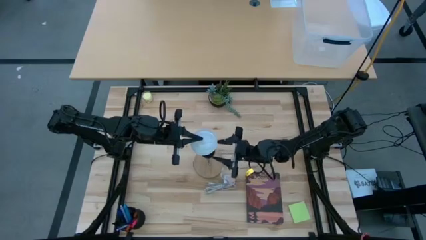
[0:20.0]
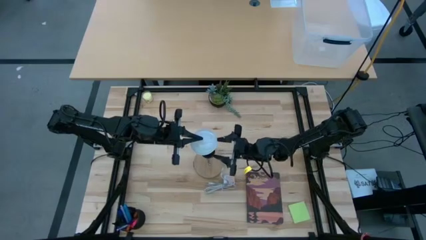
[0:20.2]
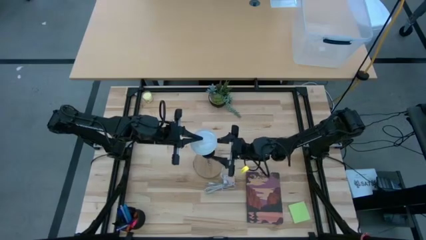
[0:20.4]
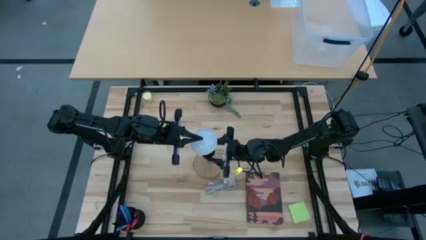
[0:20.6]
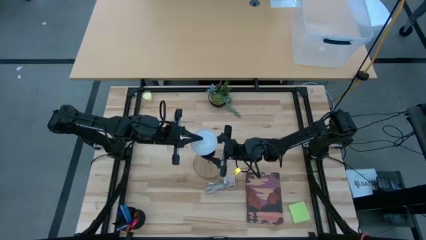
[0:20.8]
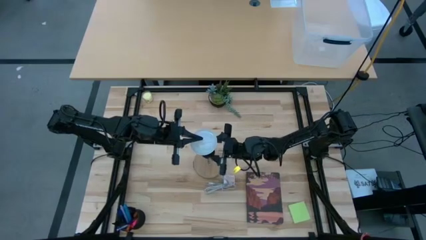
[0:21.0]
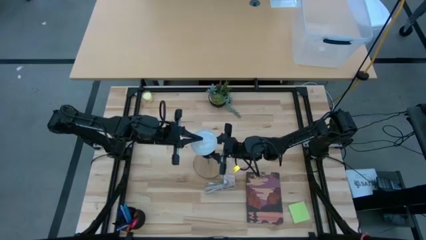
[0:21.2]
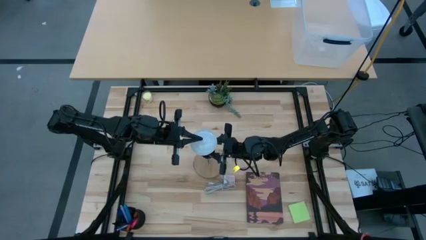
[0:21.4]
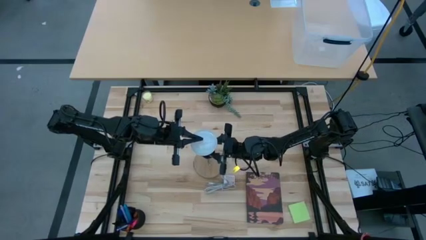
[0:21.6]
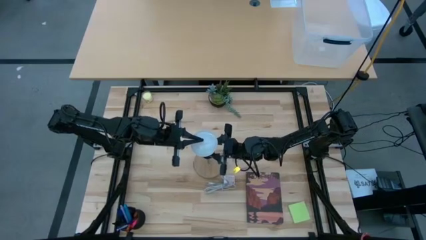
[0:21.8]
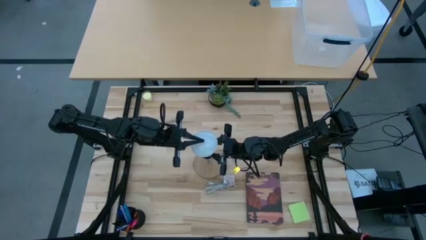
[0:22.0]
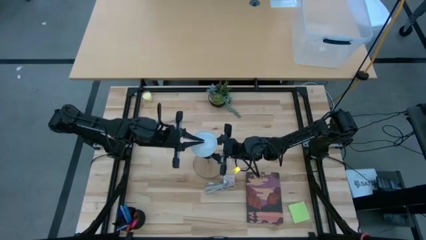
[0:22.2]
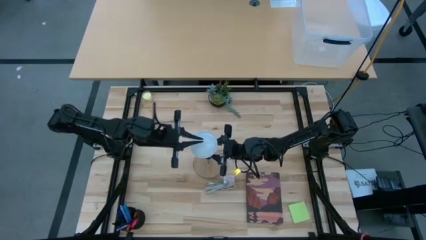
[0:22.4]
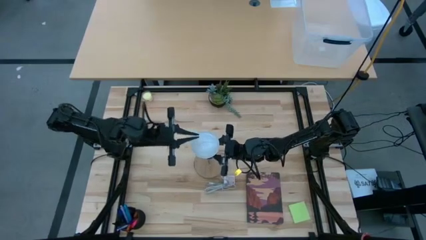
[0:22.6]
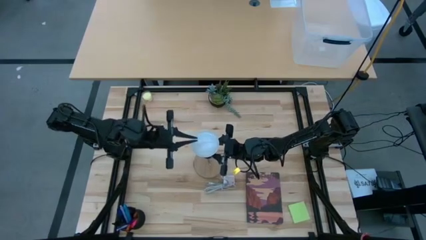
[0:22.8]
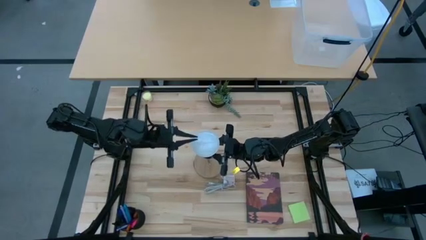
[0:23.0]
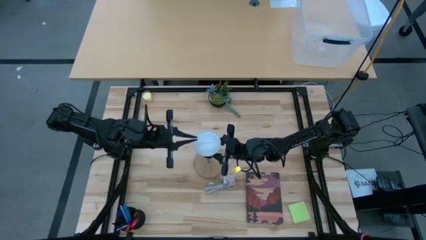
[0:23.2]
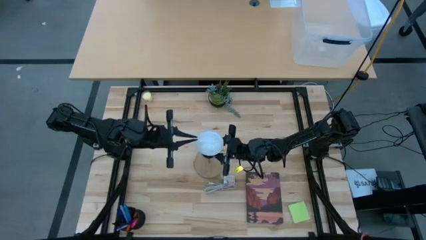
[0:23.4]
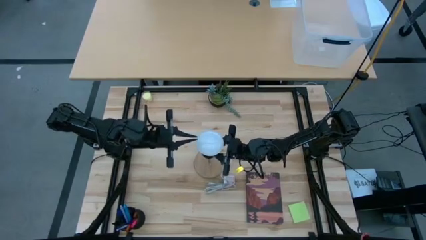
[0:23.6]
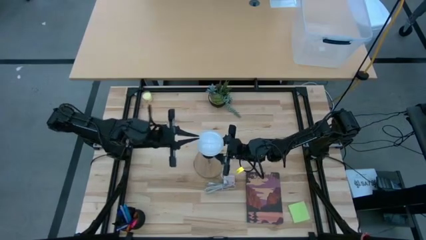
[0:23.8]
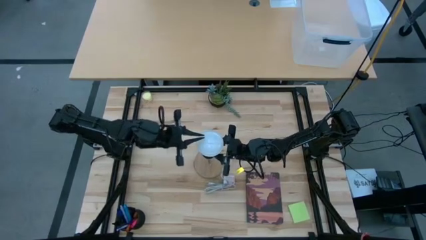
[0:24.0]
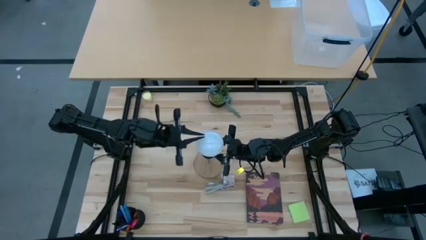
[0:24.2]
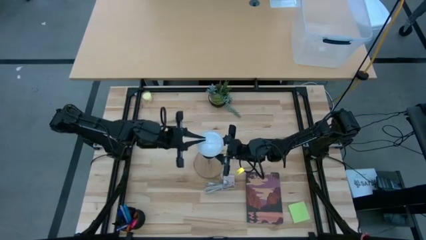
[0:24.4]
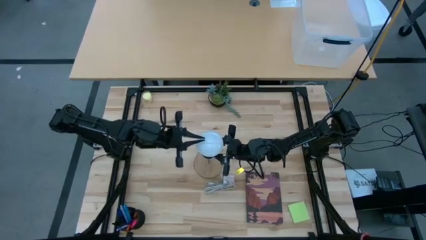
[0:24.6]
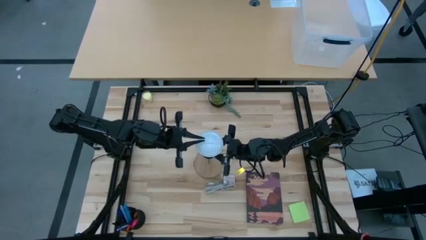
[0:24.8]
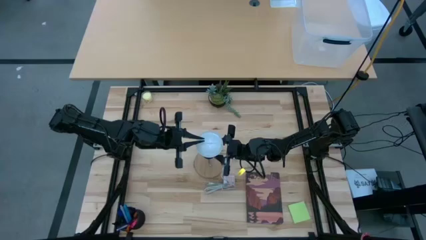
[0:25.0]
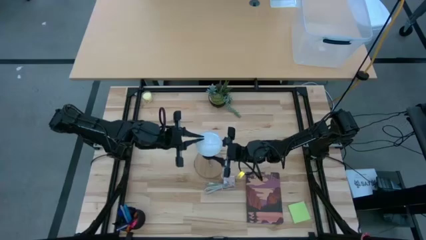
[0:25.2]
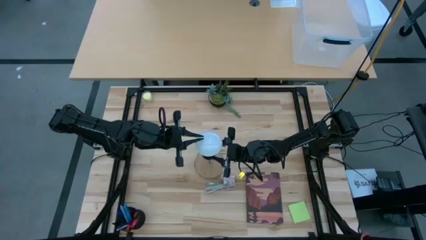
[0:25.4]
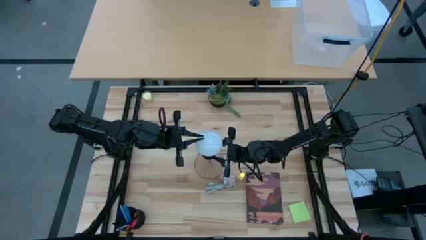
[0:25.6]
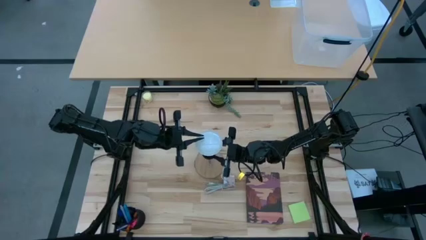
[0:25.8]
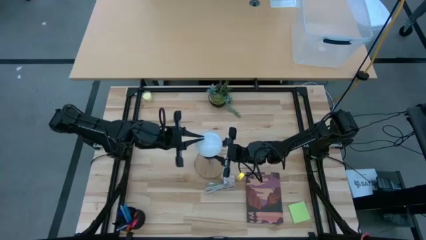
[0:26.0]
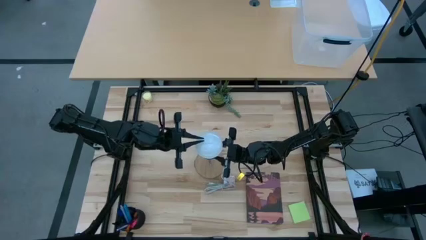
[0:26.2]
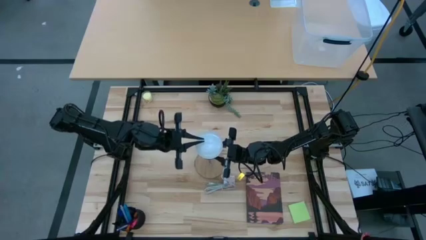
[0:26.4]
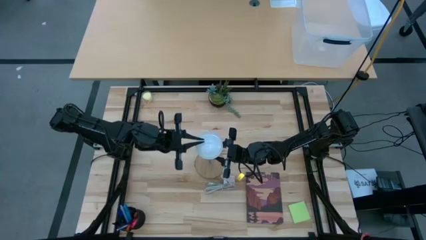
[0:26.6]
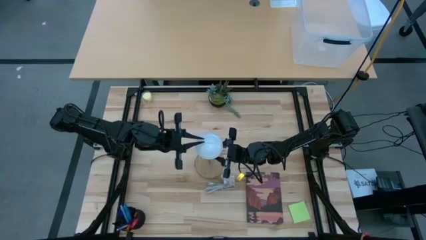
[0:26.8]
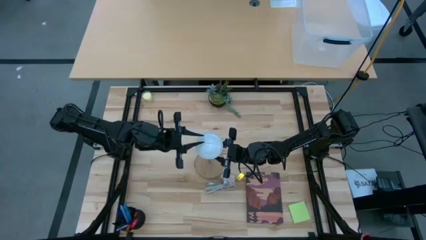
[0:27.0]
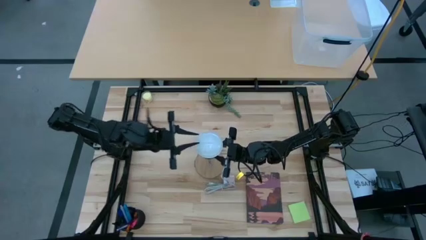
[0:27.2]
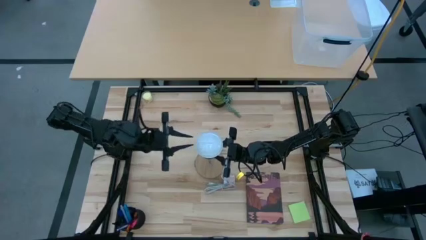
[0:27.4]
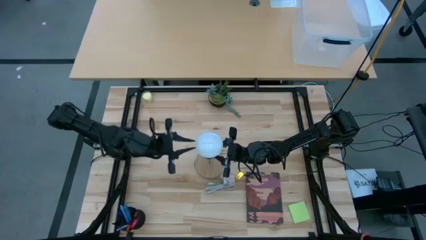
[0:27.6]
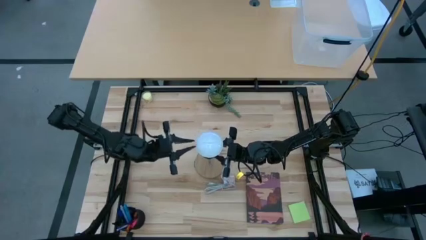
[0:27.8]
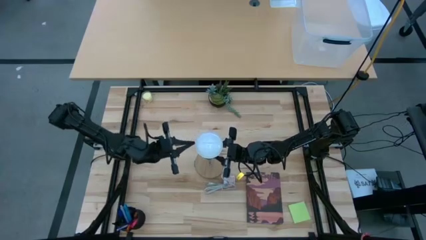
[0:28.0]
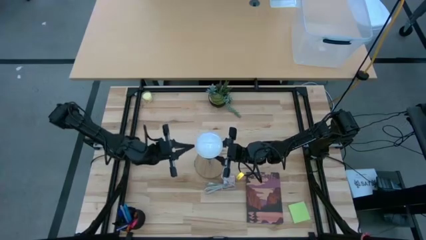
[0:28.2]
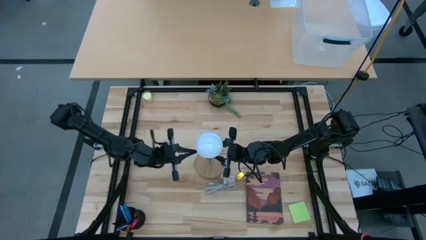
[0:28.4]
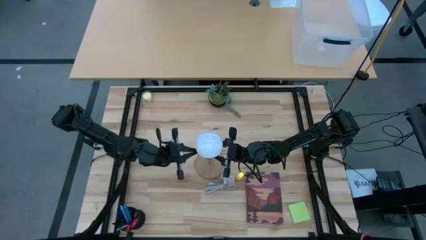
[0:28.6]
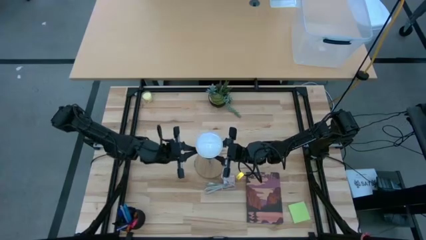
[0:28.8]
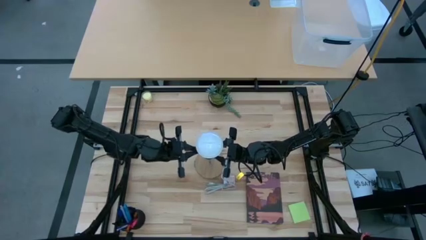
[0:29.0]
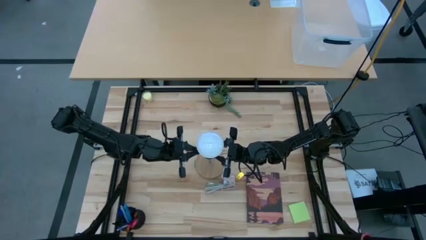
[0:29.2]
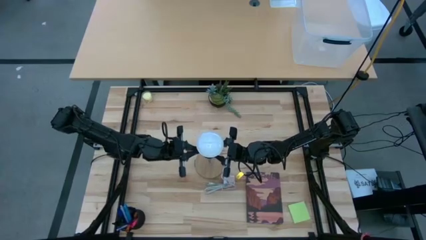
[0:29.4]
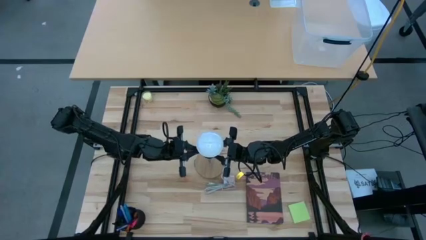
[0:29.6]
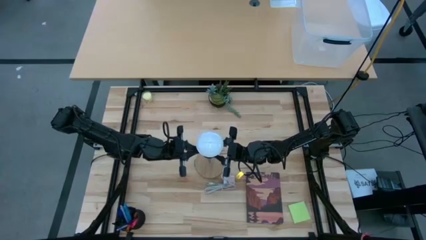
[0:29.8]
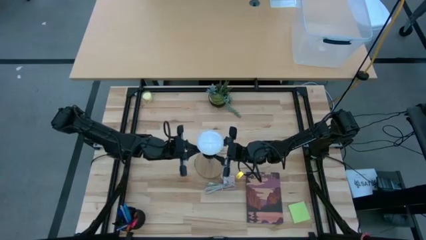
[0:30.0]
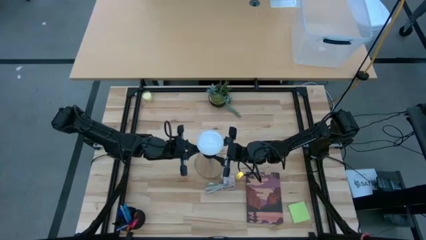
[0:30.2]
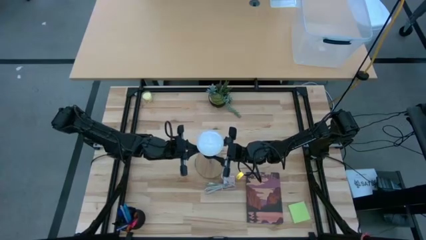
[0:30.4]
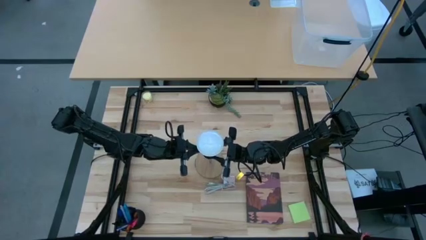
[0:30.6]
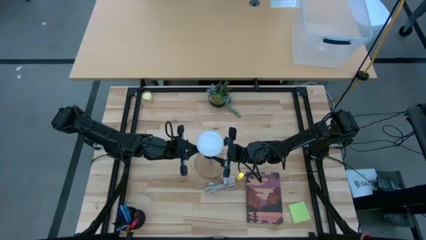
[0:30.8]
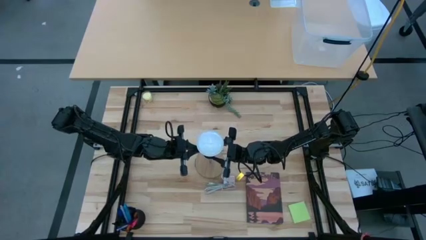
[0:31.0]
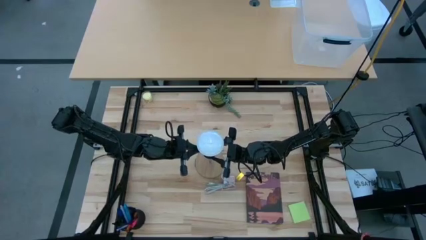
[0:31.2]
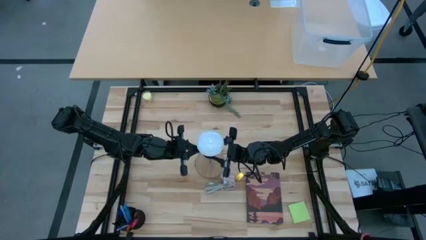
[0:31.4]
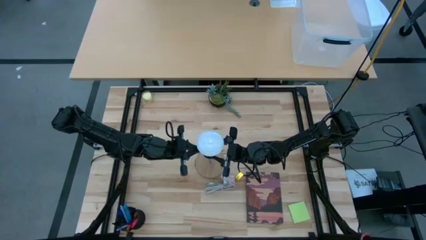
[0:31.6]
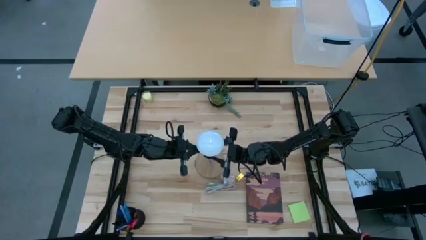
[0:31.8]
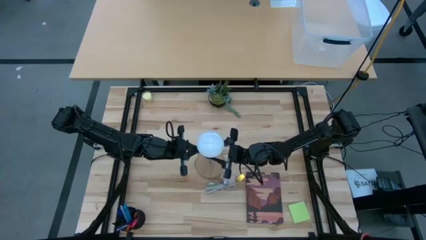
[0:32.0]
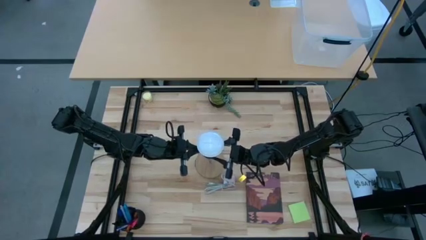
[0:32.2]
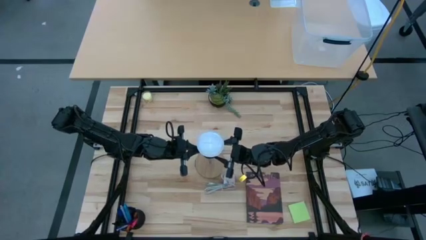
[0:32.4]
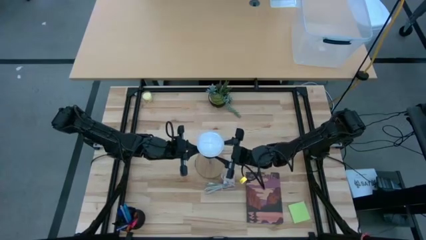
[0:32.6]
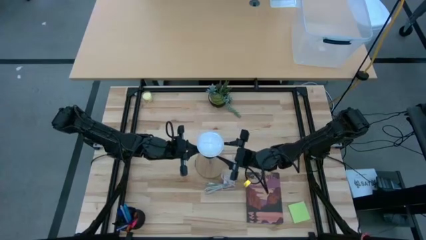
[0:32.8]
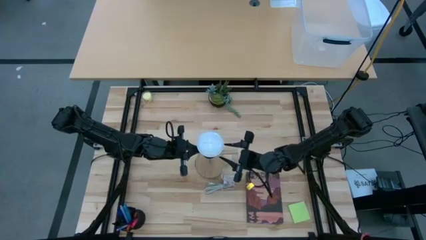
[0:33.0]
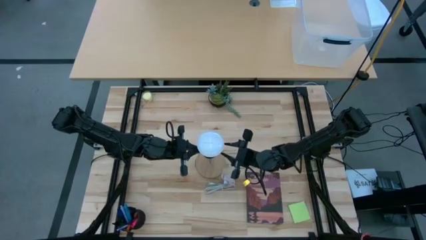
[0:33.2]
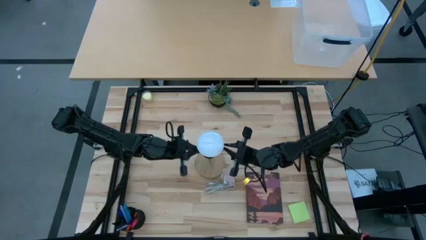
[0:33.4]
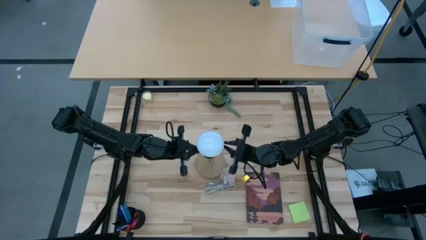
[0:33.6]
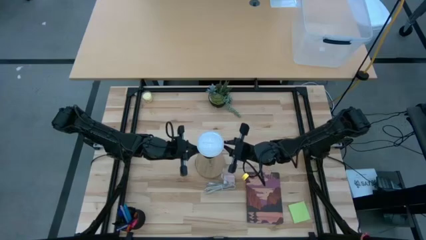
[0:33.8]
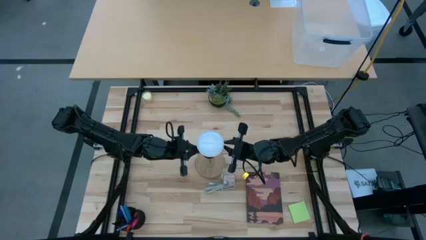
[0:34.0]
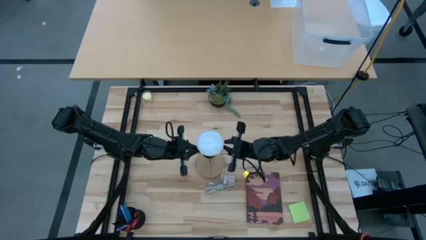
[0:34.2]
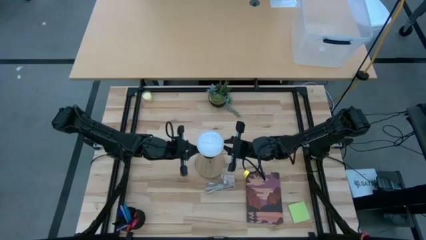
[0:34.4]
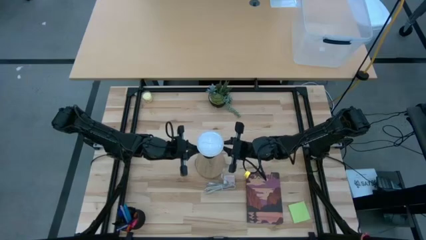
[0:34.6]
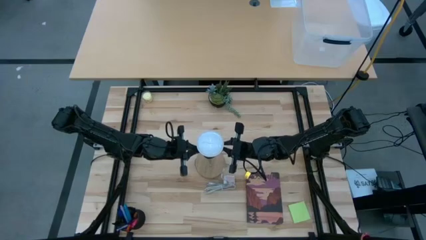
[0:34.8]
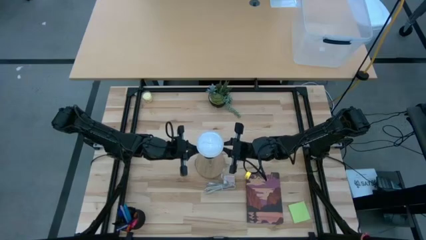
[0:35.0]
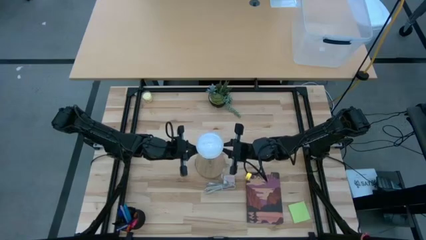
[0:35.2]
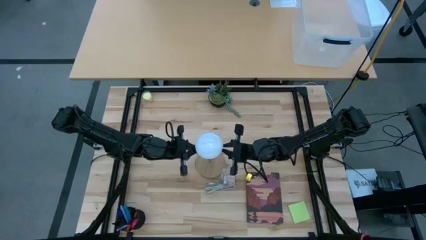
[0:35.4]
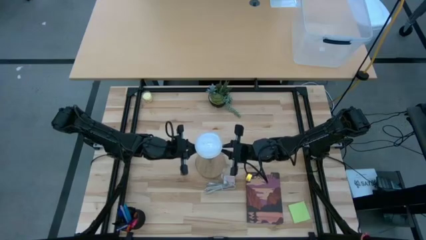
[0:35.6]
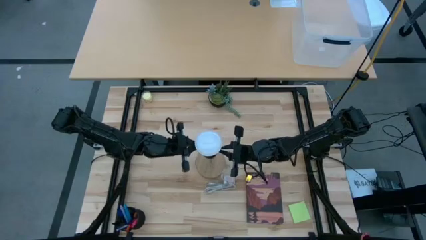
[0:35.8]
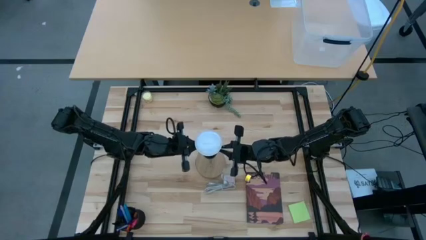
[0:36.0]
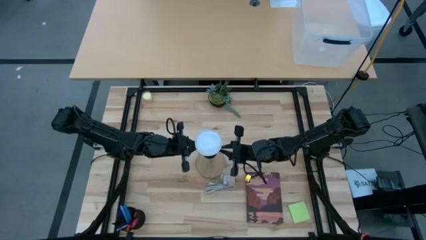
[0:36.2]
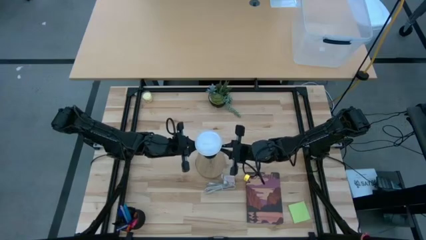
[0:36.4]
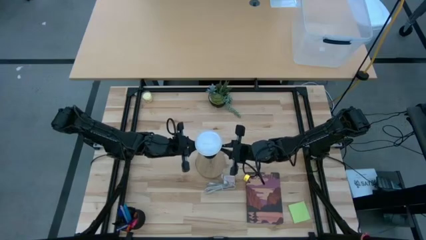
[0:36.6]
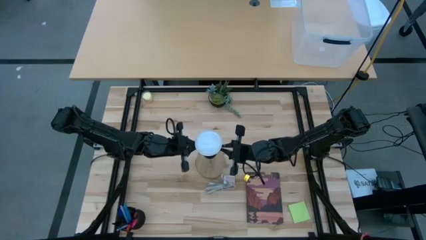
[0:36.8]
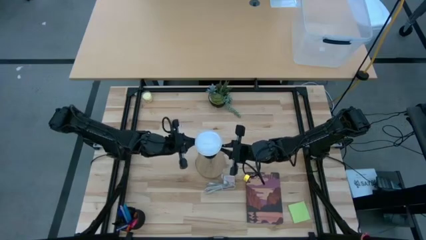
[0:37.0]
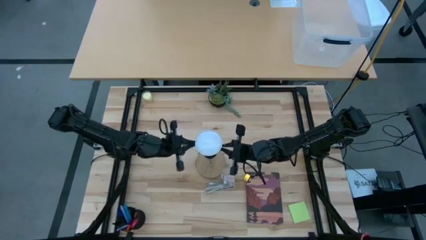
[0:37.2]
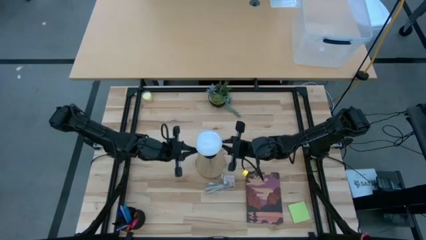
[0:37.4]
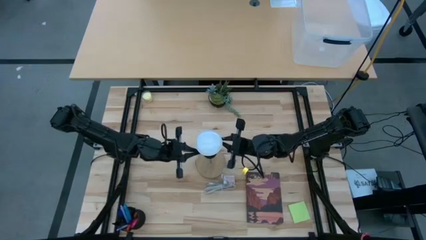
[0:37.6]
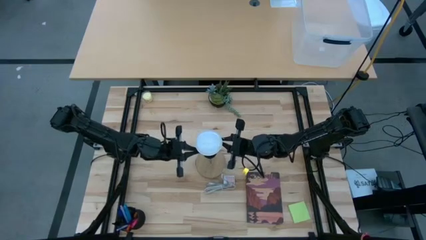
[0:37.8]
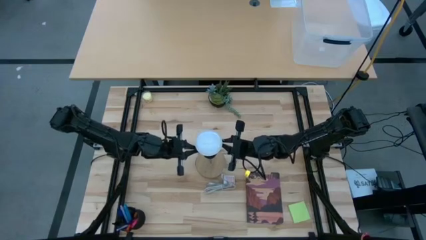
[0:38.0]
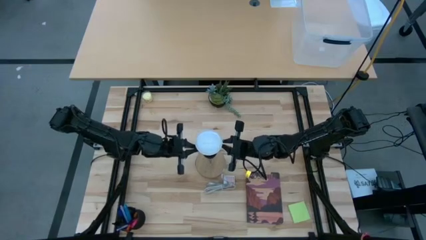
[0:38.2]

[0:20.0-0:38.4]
Task: Screw lightbulb
Insert the white lightbulb into the silver lamp
